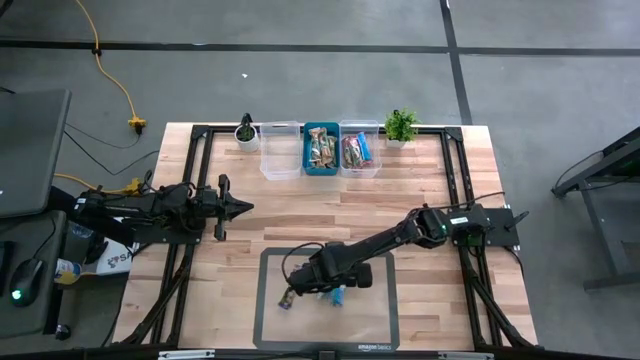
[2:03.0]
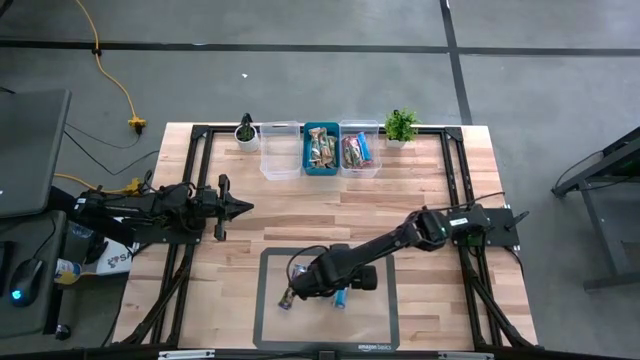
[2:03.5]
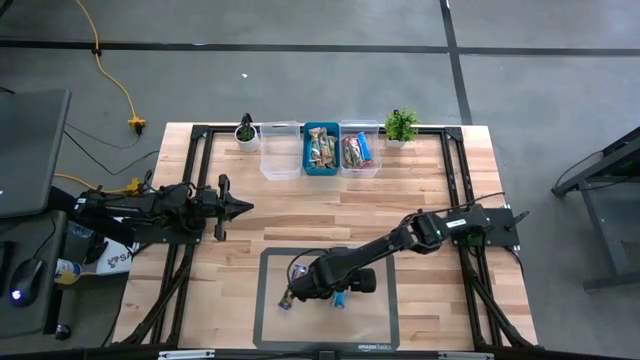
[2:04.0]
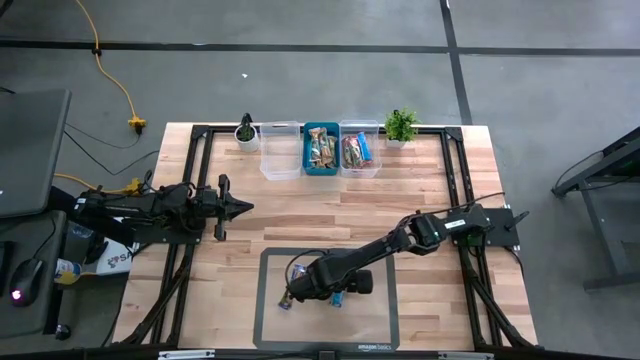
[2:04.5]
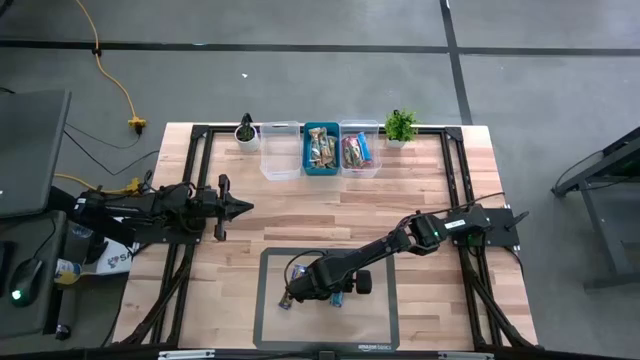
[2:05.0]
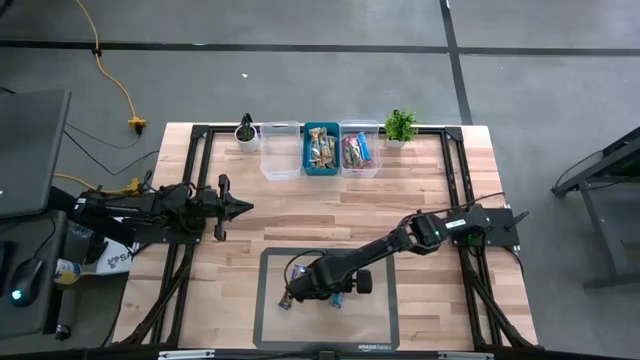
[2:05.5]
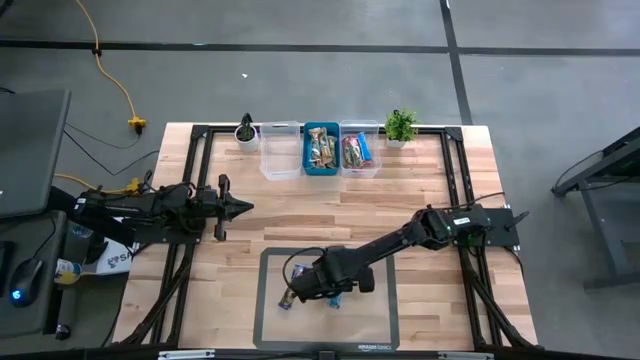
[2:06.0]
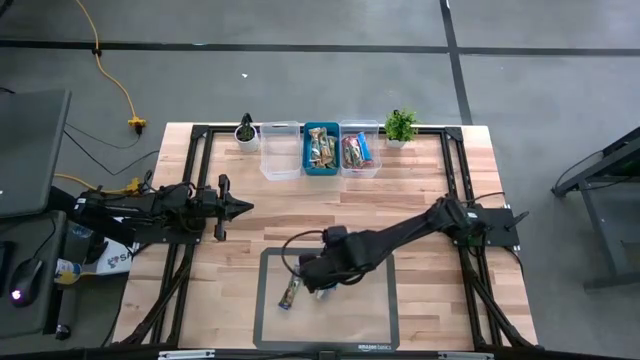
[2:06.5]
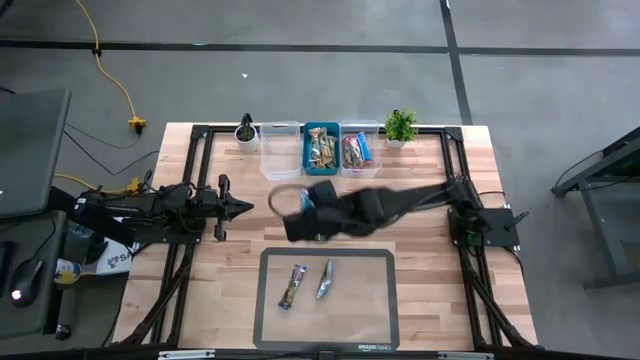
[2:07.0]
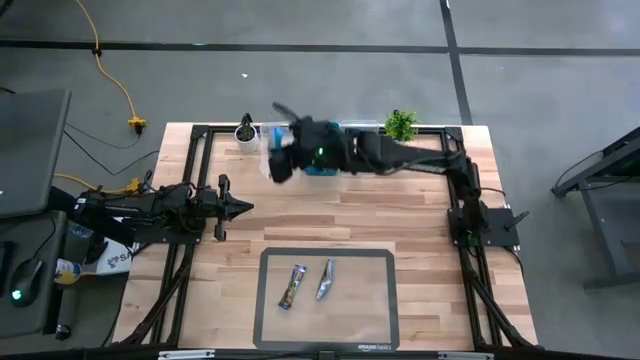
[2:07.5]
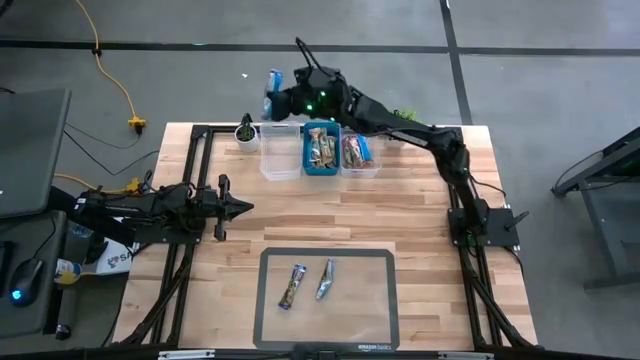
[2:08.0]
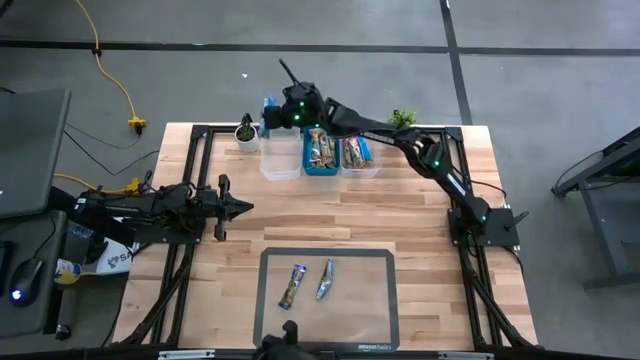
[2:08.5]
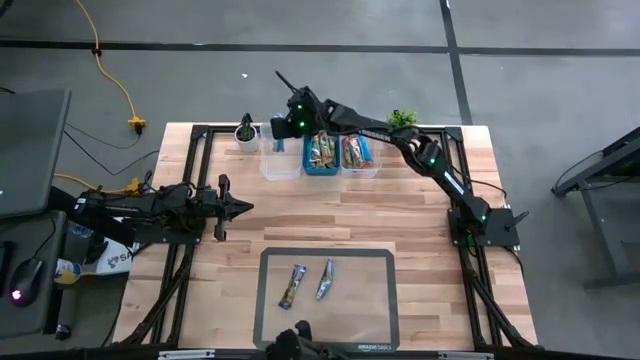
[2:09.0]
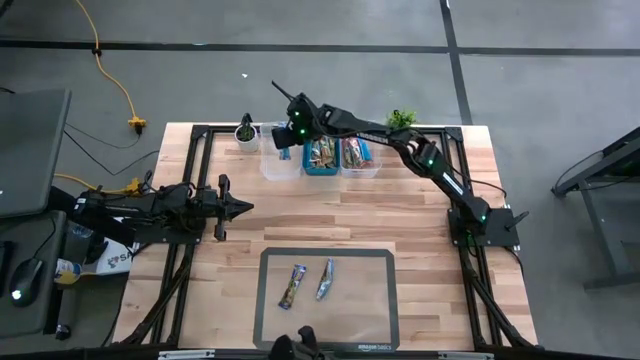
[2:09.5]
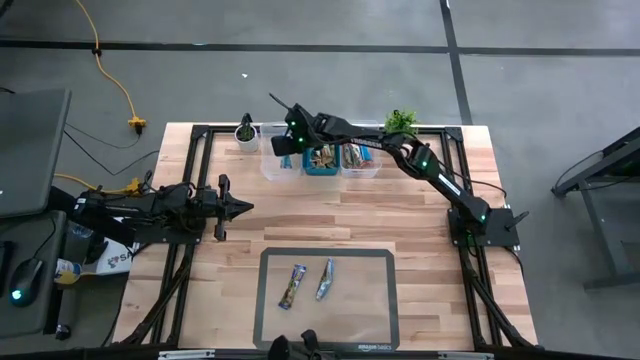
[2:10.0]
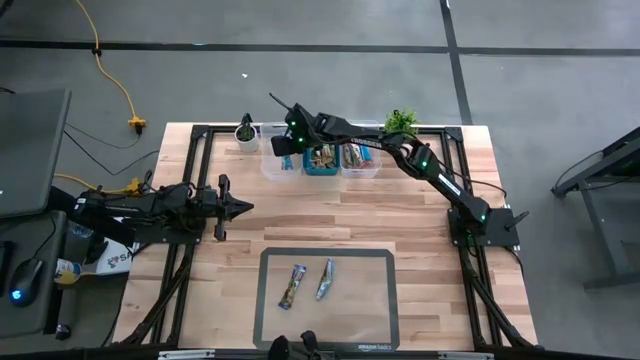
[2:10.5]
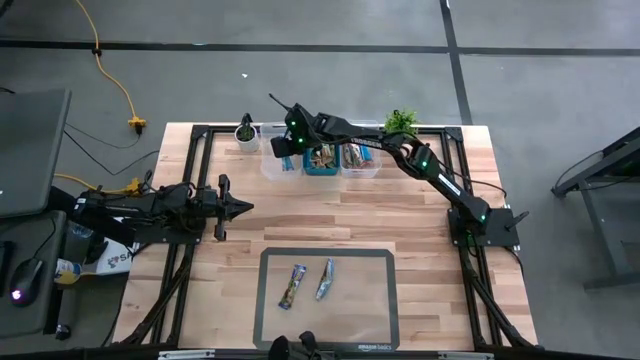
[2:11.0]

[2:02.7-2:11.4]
Task: Pick and place Granola Bars by type
Put the blue granola bar into the left transparent bin

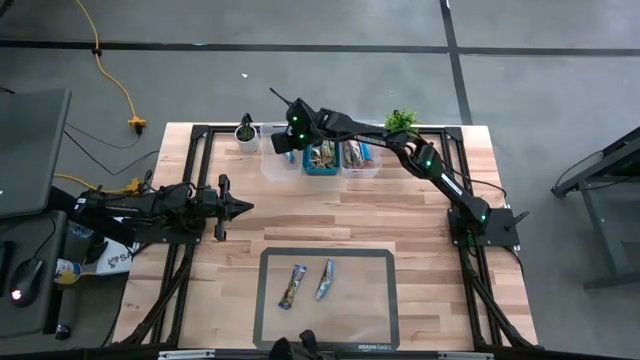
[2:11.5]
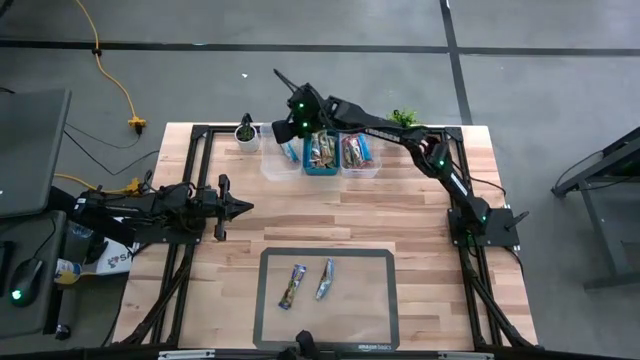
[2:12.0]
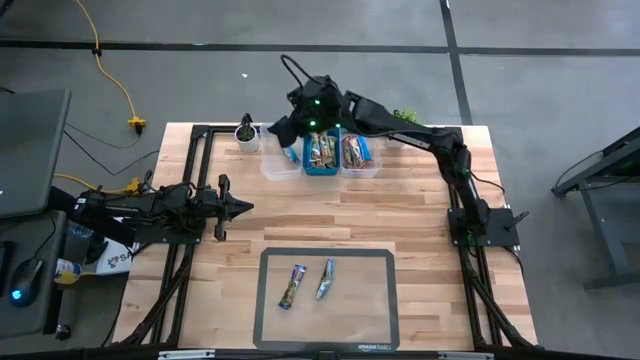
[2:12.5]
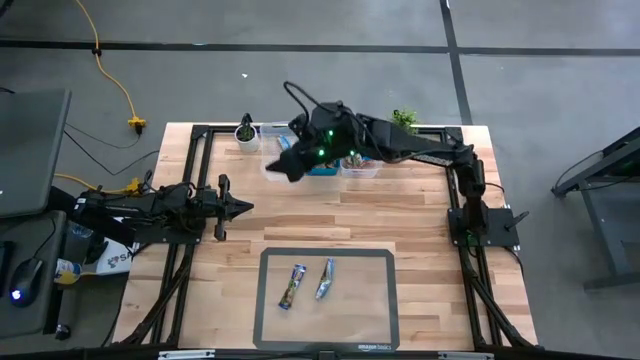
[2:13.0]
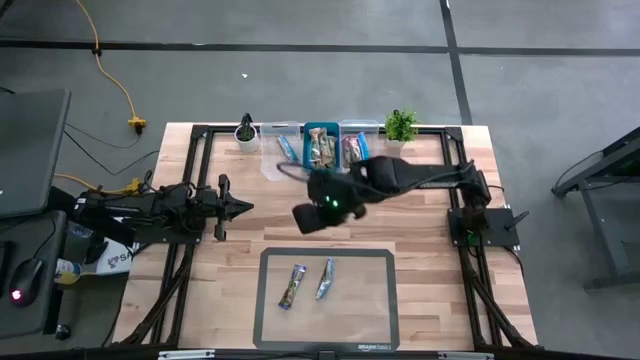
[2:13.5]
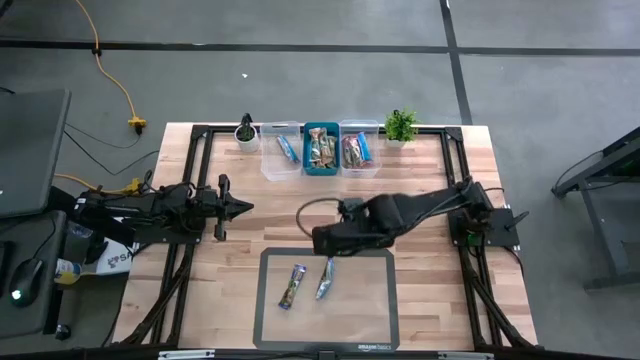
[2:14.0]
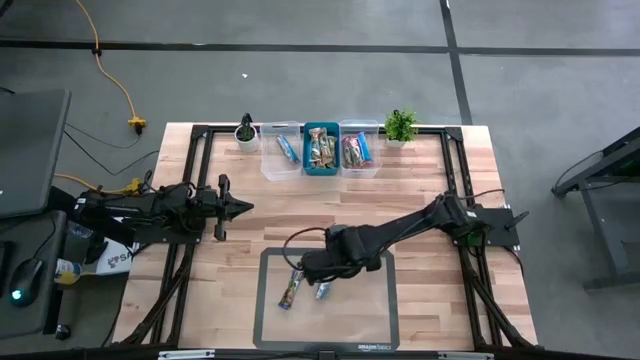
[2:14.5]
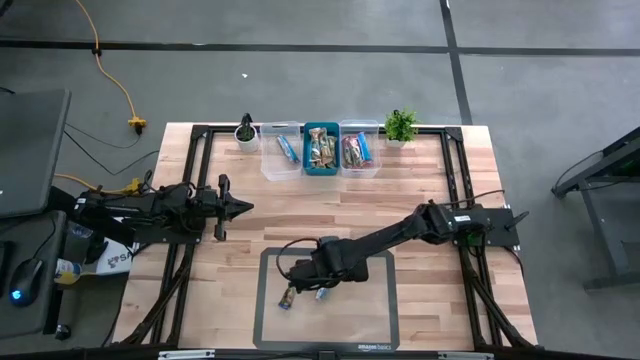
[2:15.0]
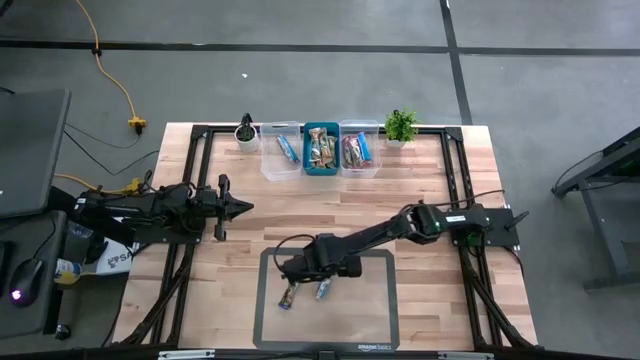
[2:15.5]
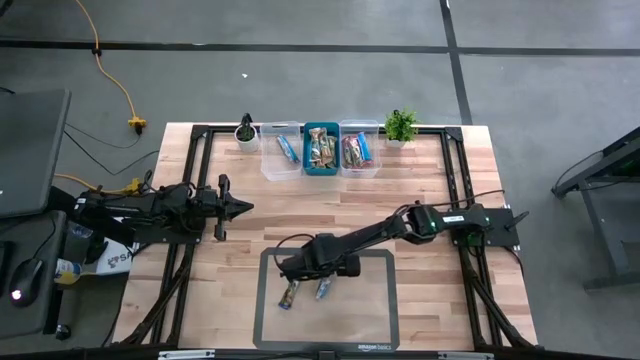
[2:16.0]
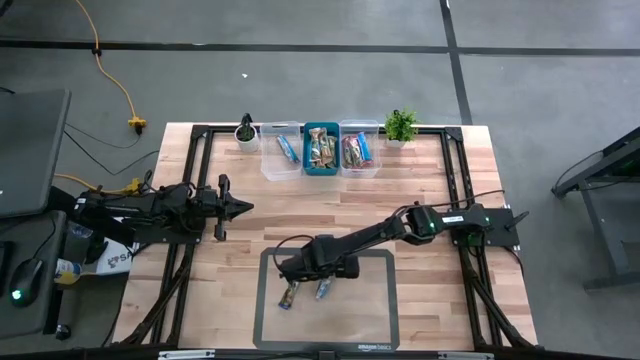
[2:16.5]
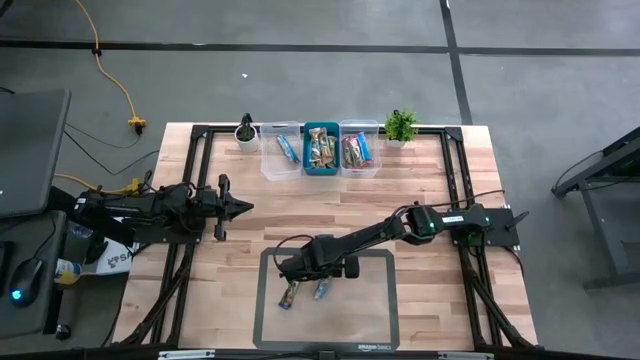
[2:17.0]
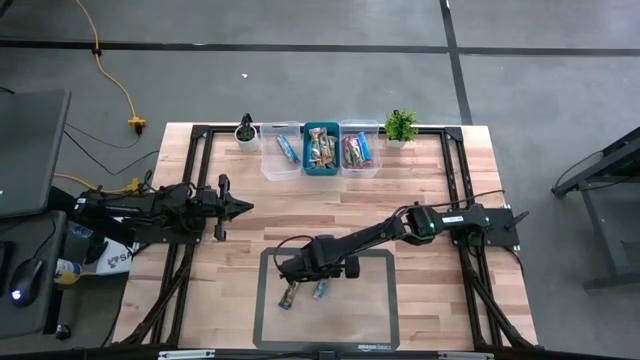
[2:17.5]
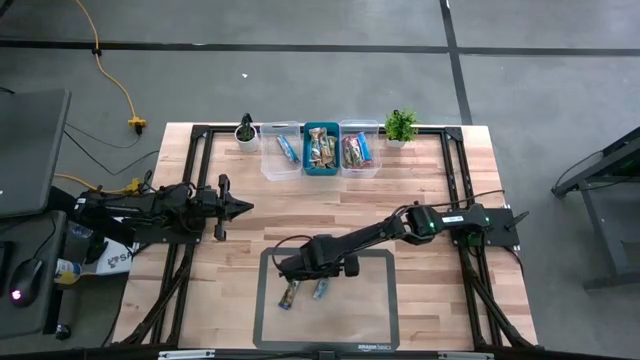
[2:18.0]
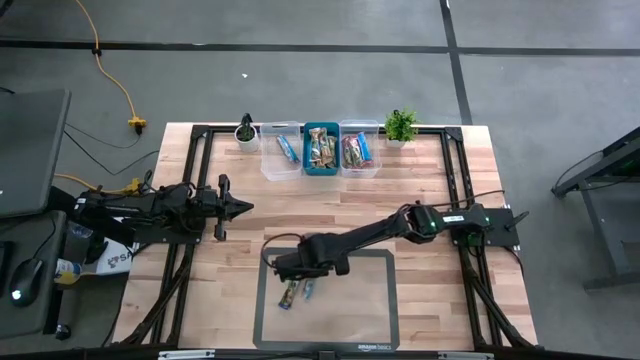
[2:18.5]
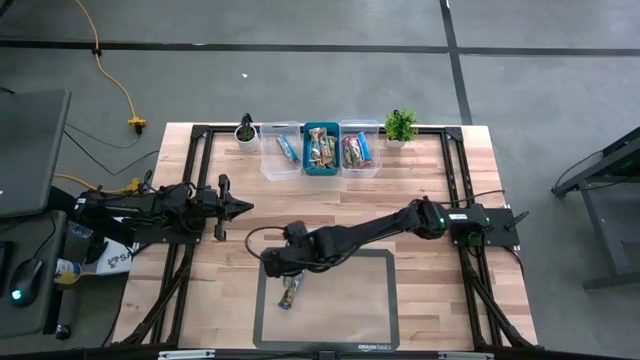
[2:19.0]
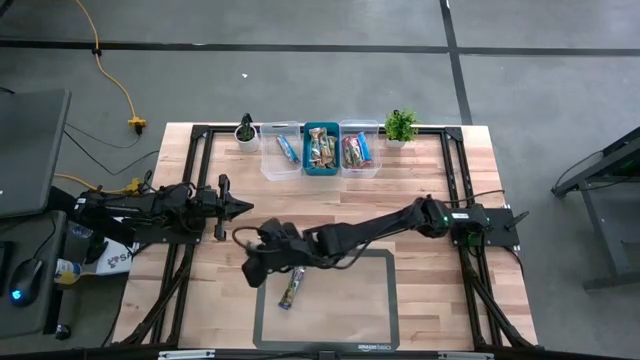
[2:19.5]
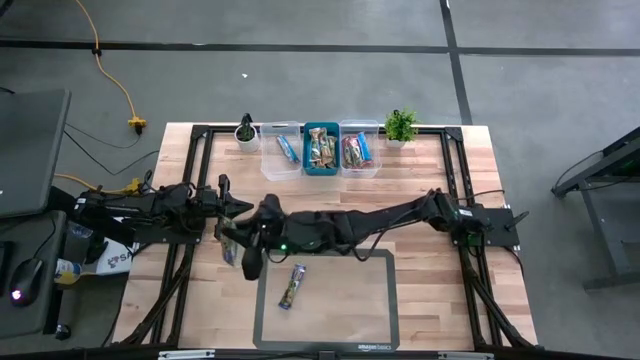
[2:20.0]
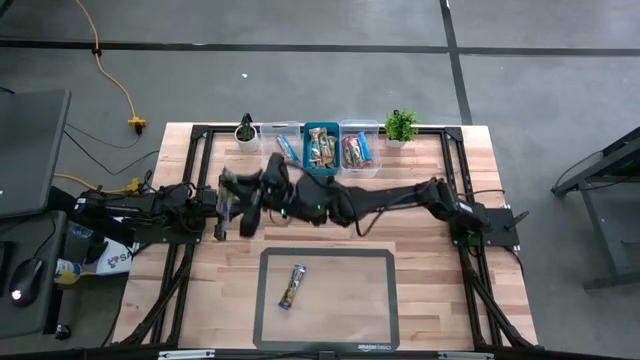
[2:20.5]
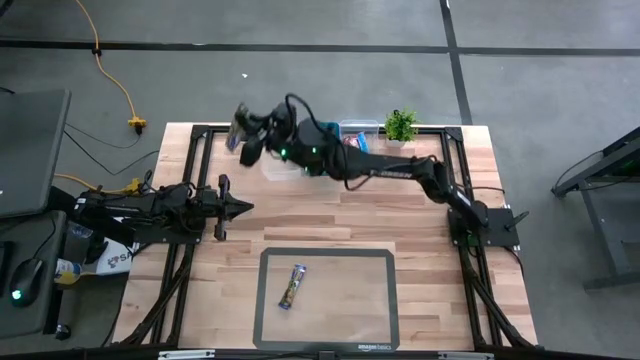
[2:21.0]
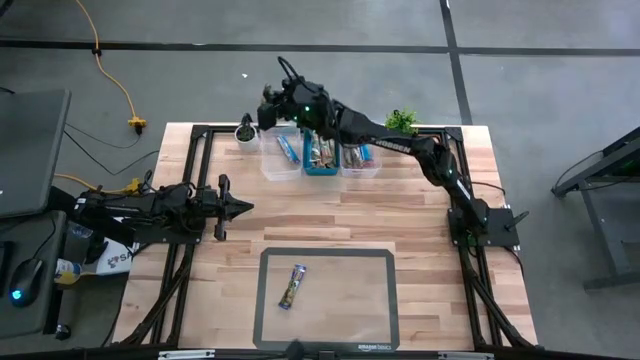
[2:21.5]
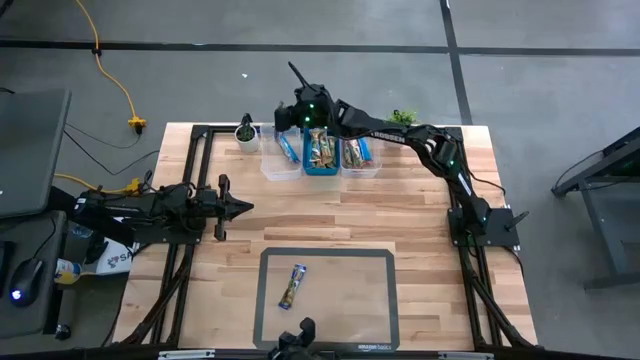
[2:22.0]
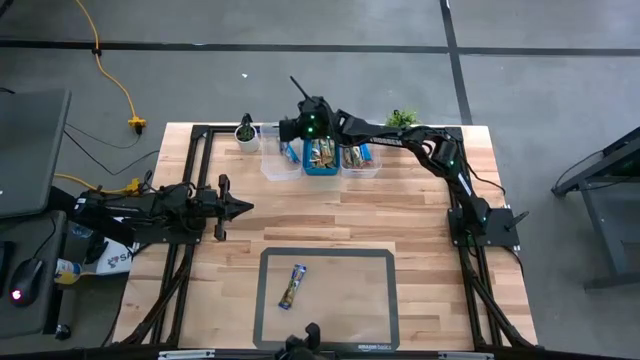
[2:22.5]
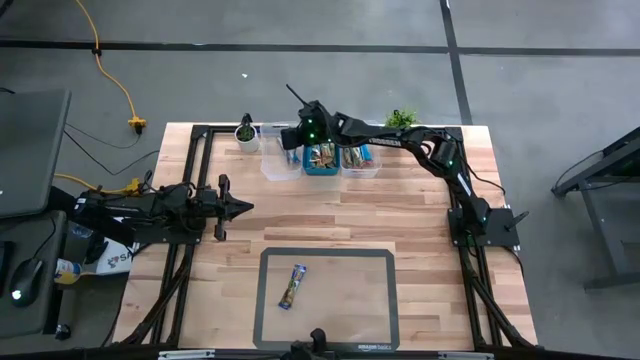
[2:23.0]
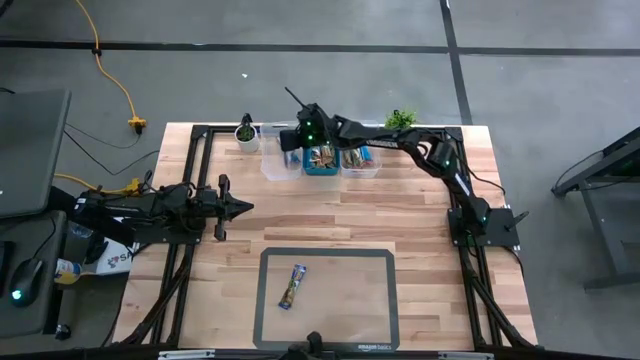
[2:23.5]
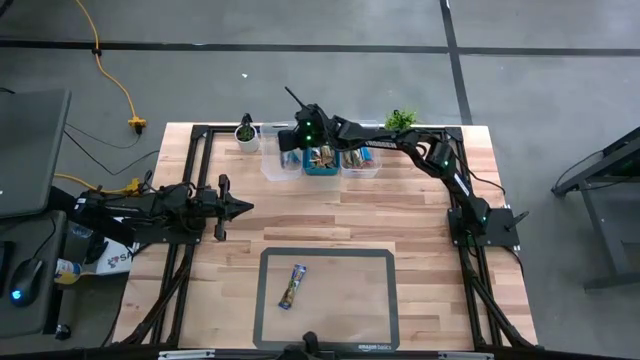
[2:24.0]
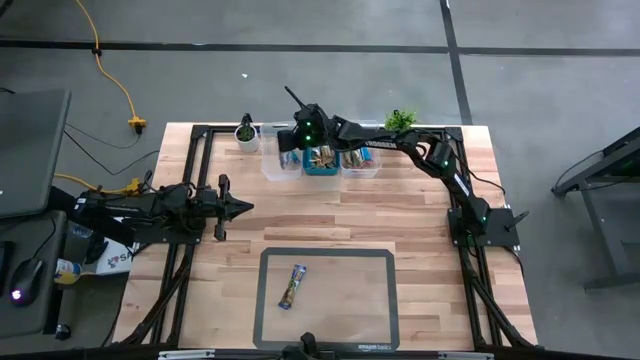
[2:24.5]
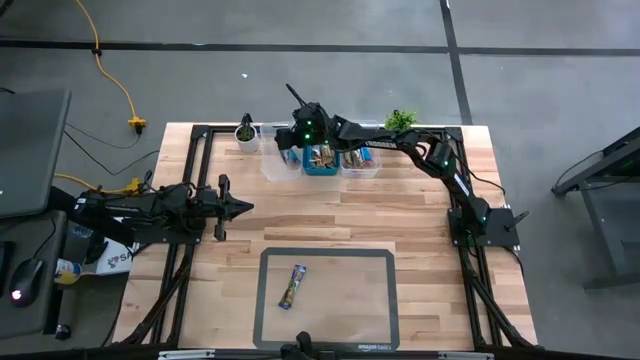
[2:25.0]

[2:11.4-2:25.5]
Put the blue granola bar into the left transparent bin
